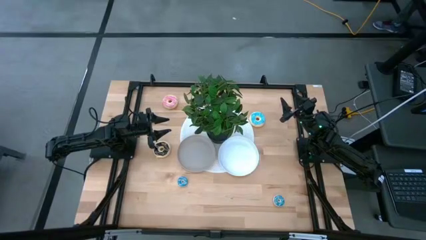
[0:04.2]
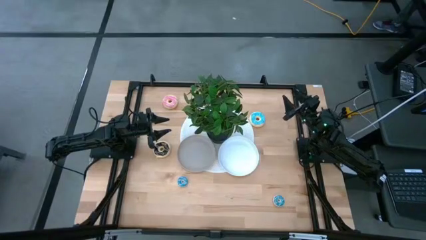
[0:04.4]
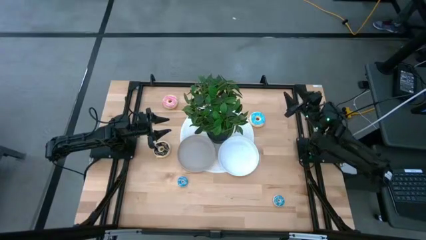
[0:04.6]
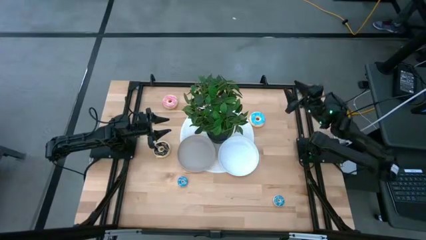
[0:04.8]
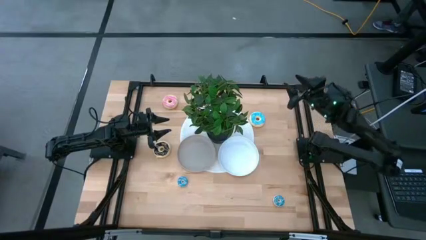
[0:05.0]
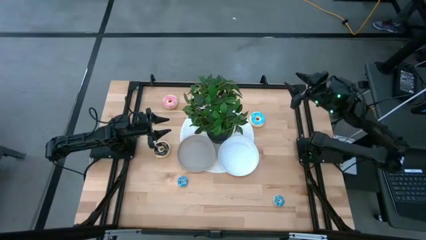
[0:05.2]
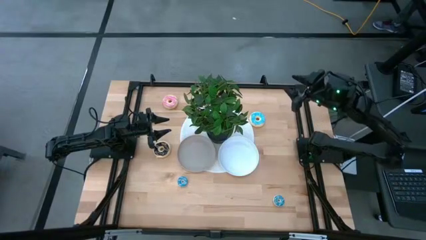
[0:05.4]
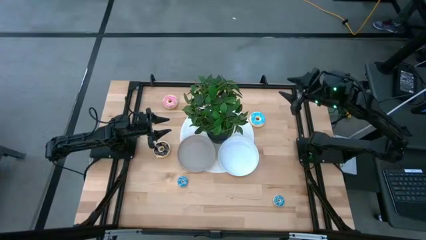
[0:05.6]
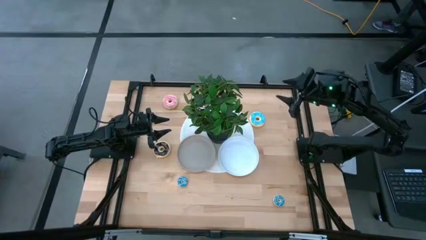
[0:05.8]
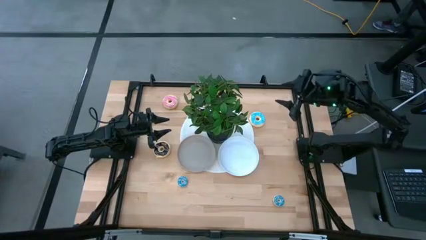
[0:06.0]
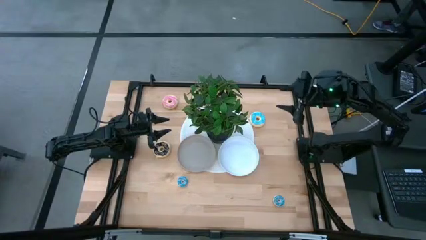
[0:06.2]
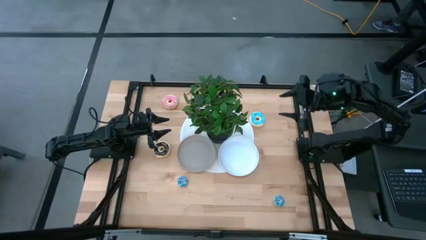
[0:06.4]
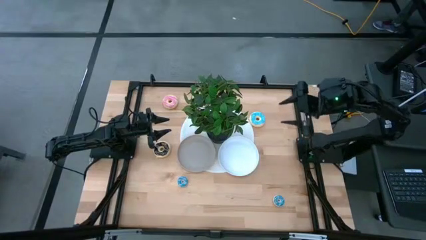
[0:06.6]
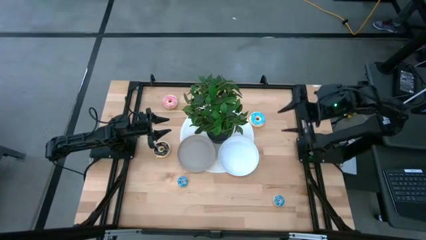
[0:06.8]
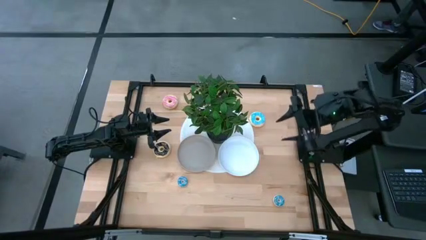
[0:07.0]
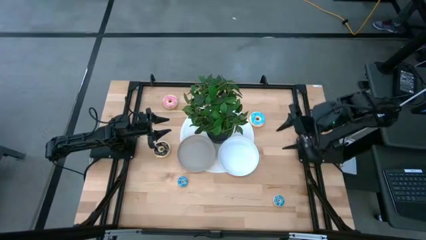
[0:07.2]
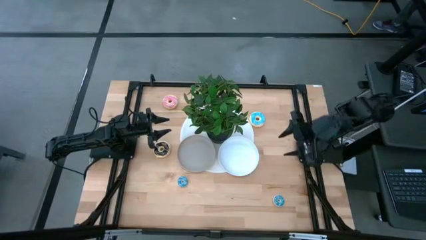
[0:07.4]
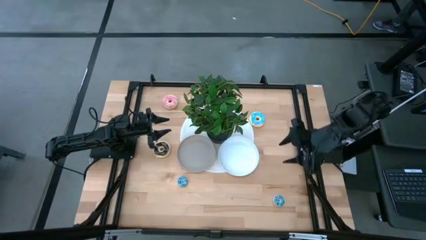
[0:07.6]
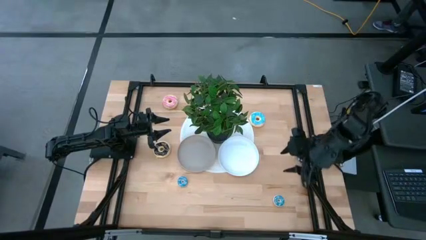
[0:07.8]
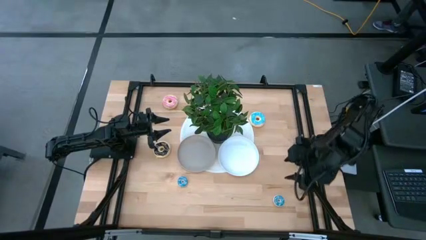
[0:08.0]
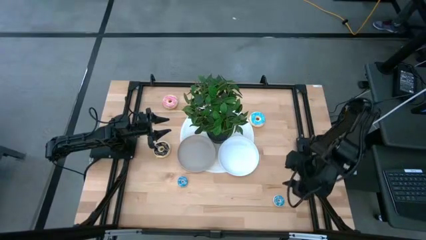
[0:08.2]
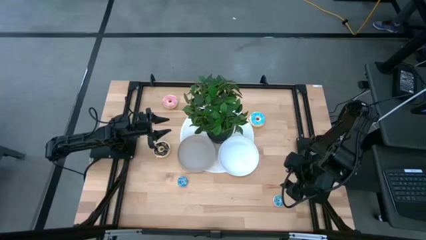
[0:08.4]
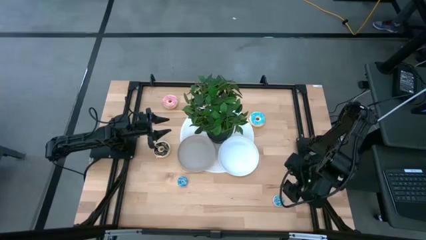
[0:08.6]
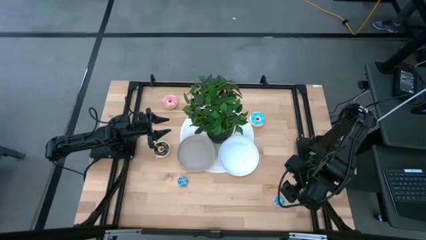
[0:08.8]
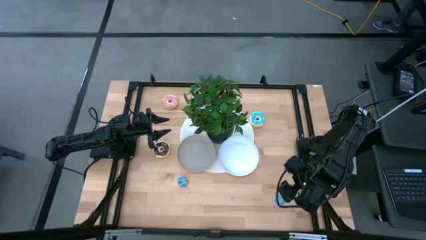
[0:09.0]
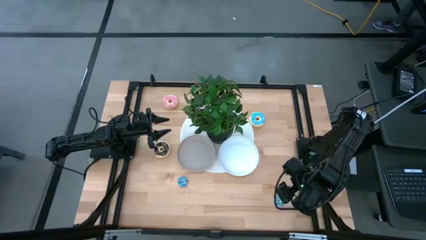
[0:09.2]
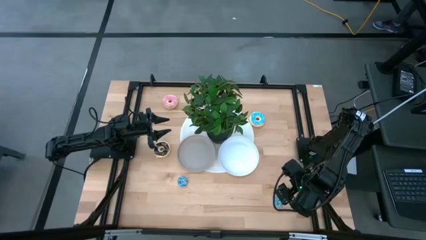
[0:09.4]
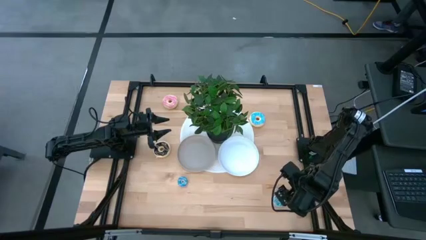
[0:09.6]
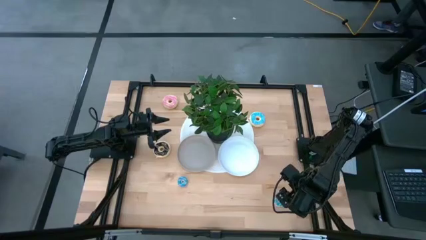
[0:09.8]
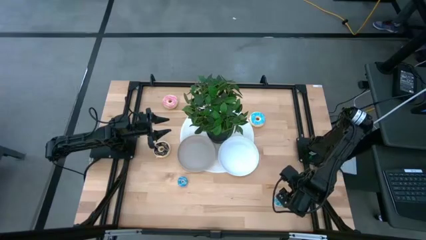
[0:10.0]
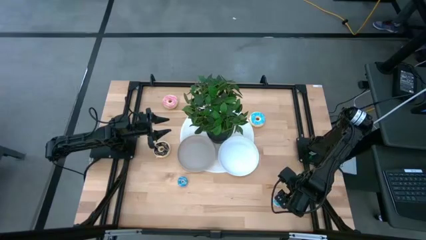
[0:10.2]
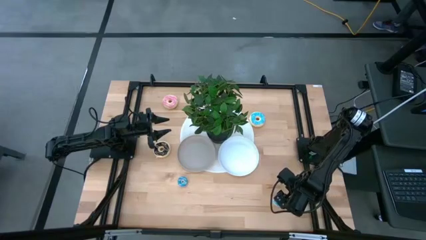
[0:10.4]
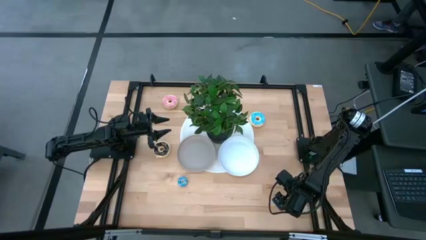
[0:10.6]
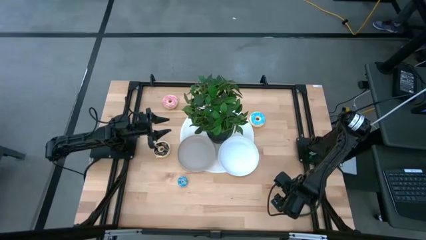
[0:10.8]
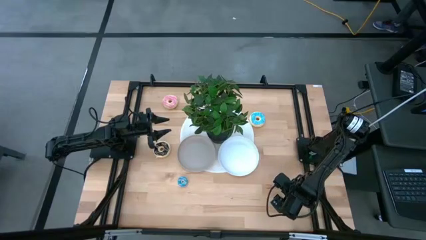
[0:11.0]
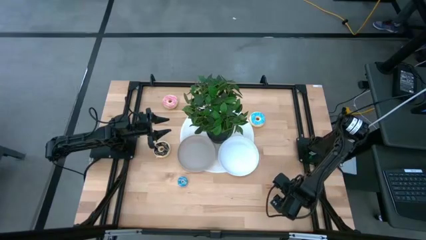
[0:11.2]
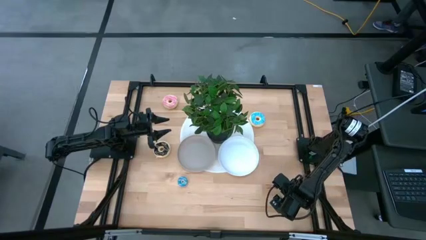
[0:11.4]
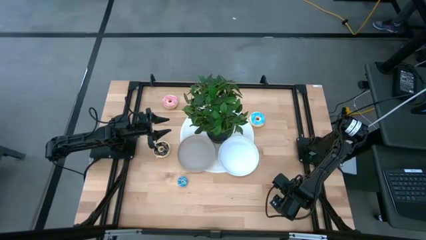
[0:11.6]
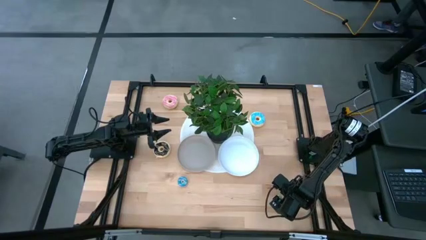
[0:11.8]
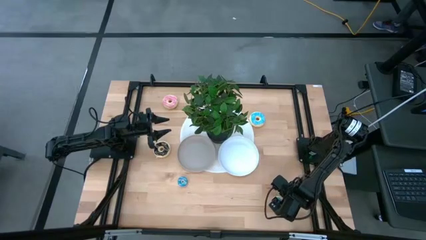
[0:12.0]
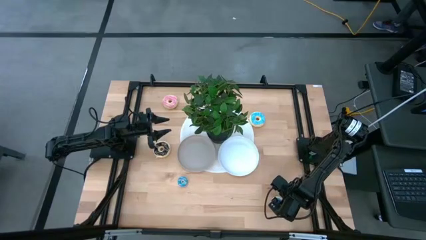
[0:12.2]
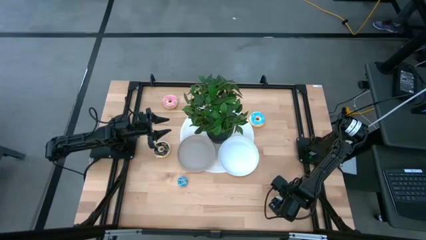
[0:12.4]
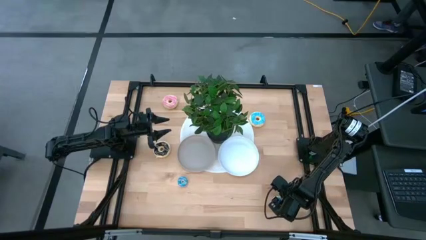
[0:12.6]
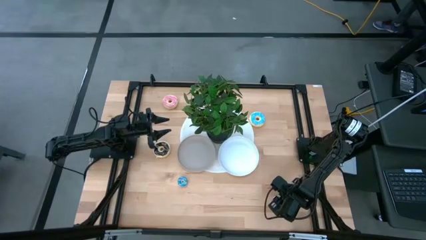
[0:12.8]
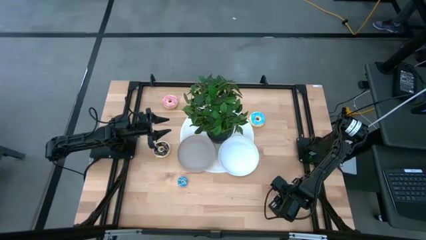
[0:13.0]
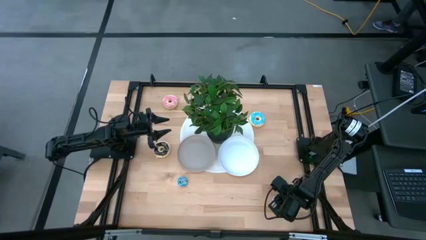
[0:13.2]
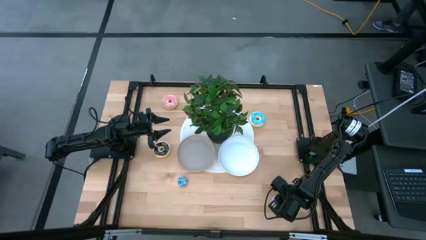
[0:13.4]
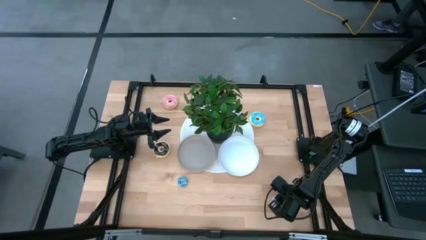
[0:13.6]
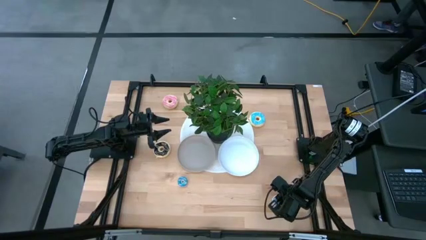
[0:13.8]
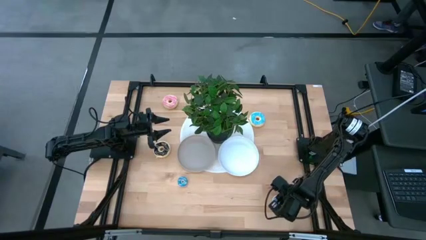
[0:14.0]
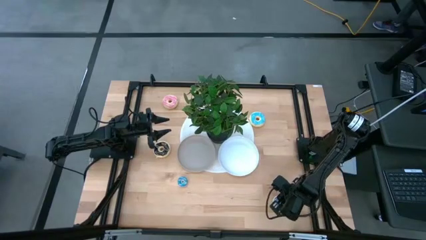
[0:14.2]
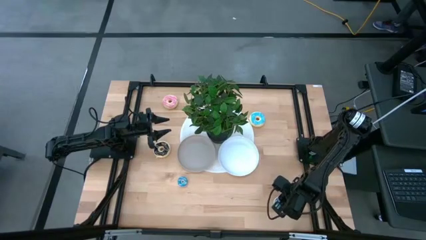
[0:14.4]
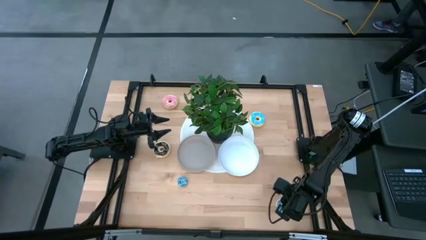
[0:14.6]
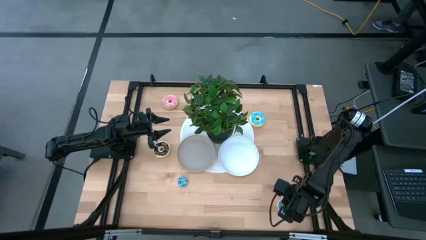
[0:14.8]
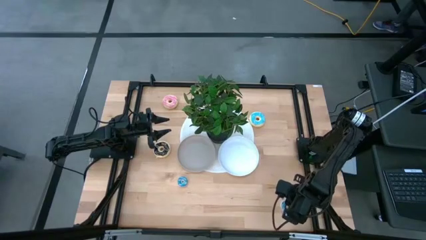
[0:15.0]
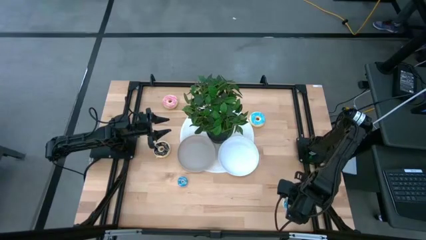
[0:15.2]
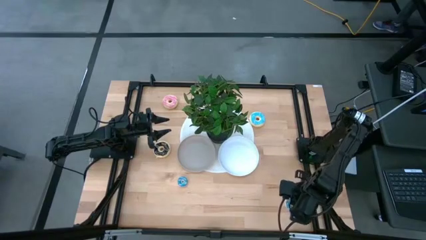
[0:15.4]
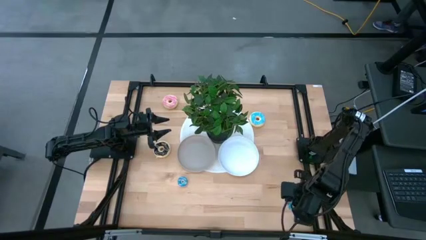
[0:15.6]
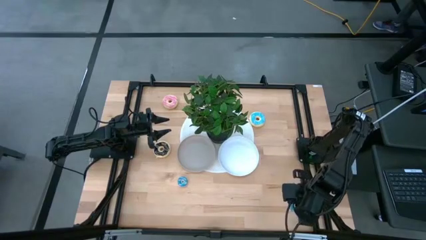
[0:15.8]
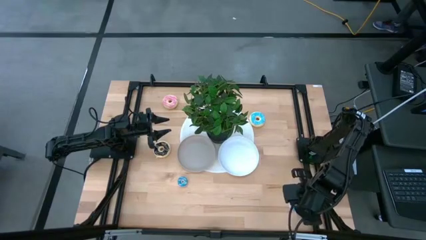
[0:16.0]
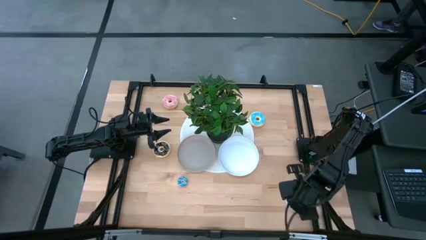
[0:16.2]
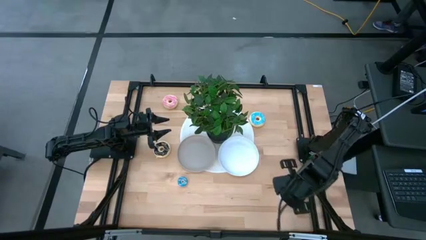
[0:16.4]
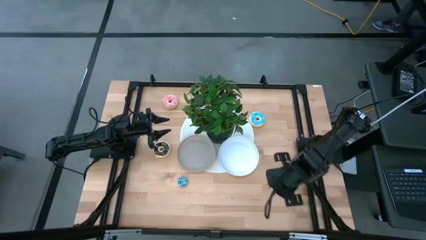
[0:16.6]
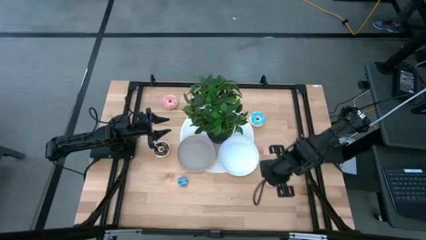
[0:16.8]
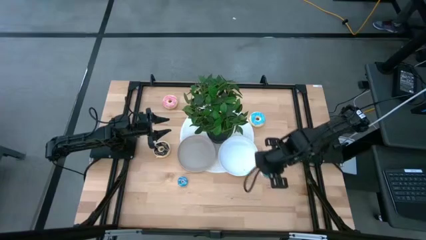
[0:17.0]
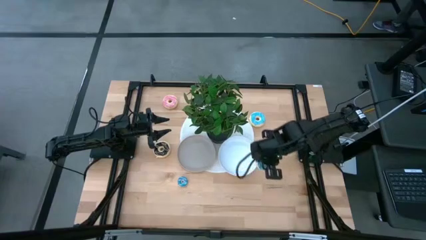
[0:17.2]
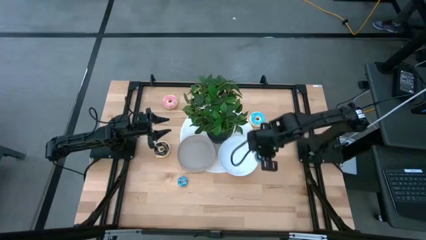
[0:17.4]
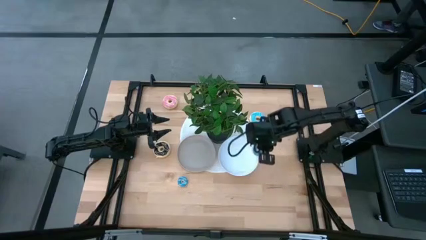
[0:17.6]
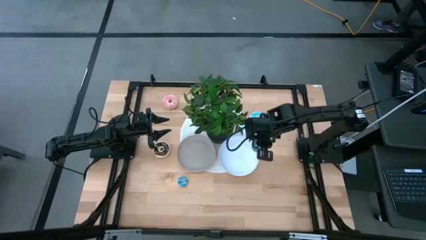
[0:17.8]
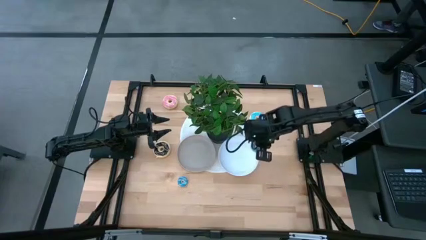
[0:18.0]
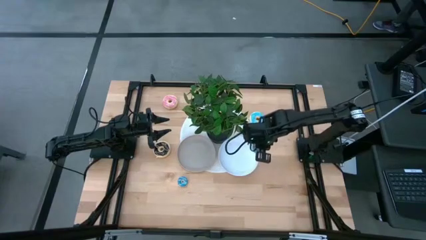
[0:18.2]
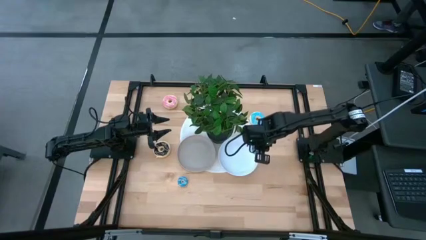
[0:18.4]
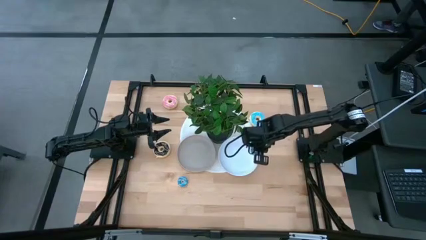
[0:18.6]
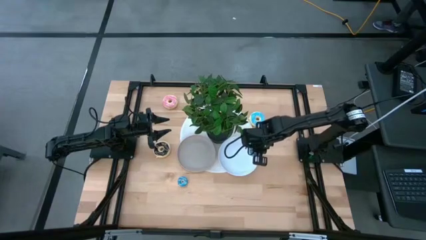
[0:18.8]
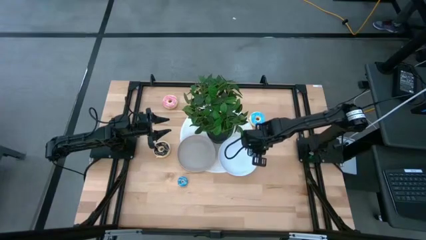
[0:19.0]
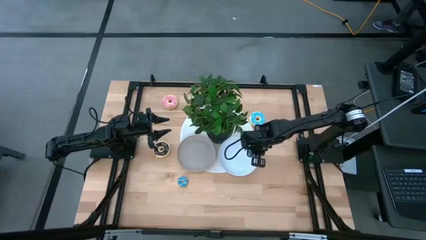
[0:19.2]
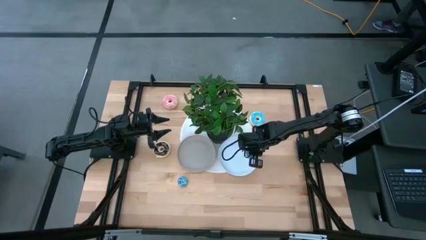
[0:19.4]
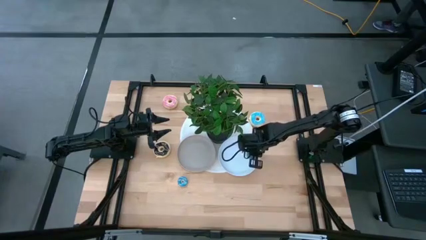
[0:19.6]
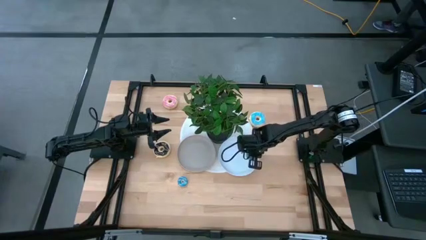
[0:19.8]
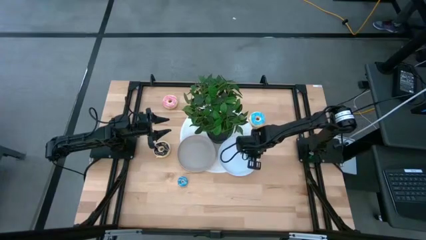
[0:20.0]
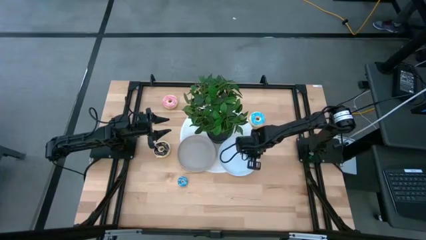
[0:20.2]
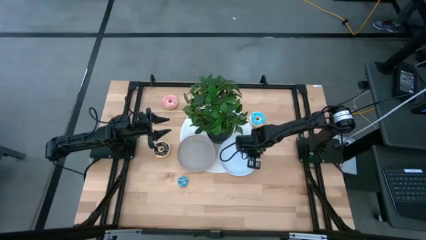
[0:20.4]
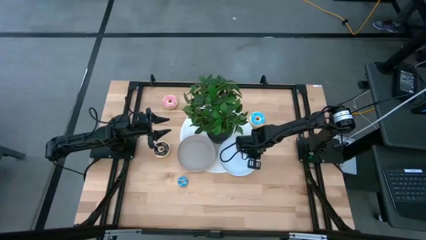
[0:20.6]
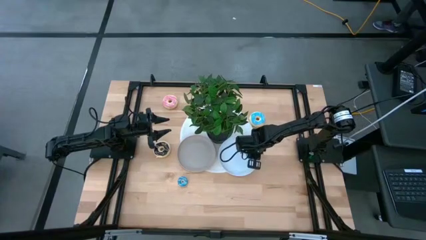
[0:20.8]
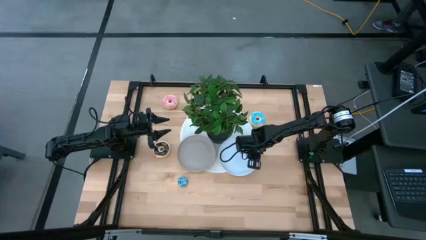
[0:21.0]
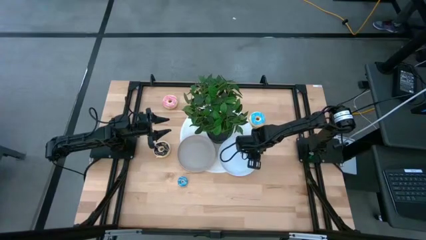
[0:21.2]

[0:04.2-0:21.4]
Task: Pick & Place donuts
Put the right small light blue donut on the white plate
